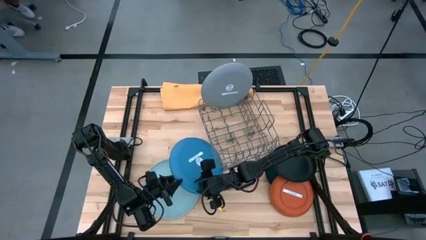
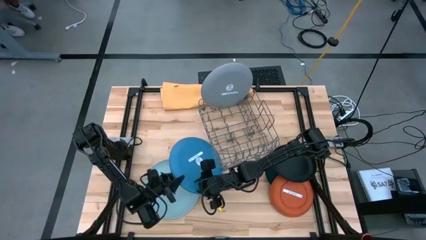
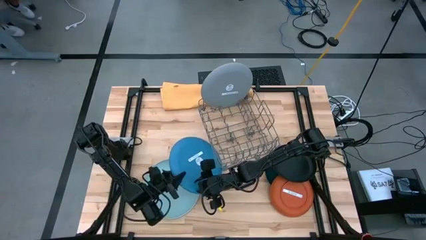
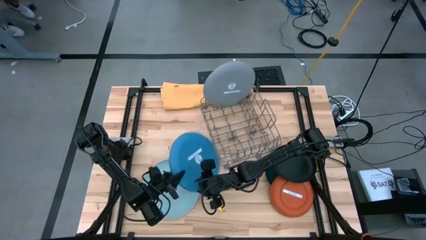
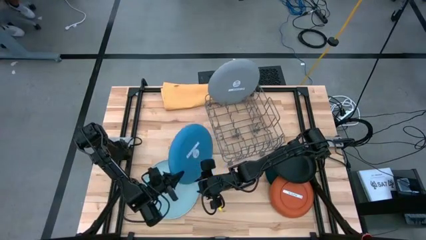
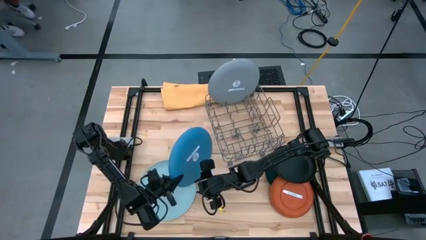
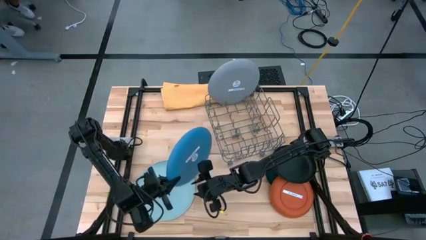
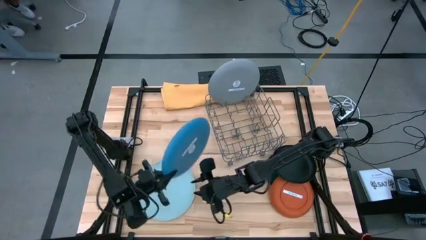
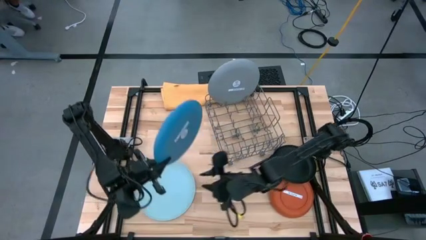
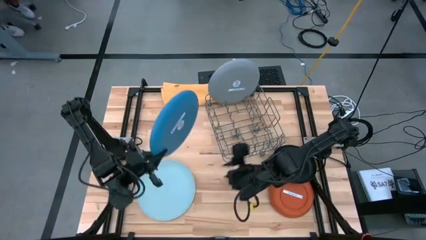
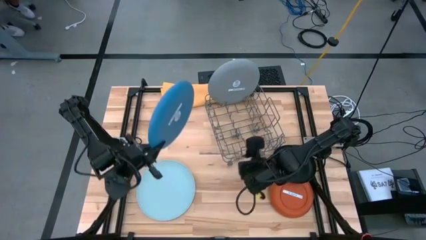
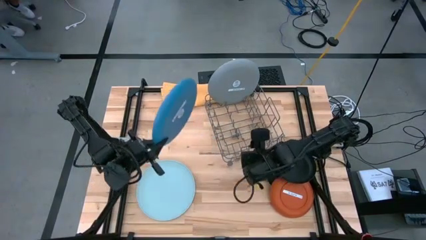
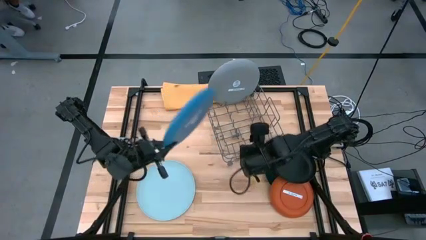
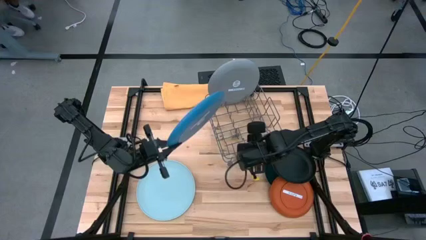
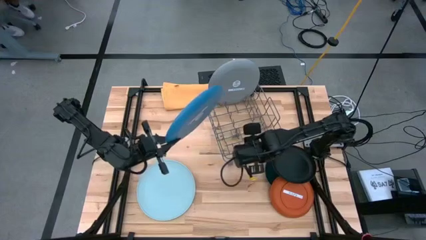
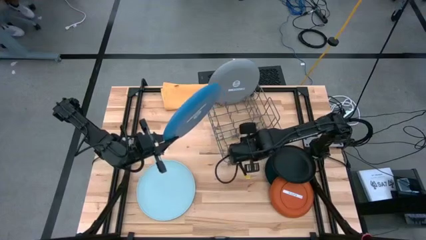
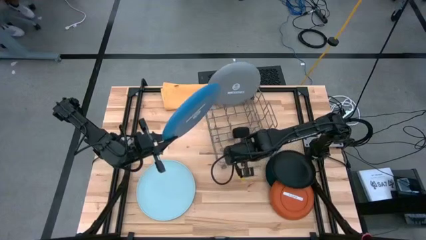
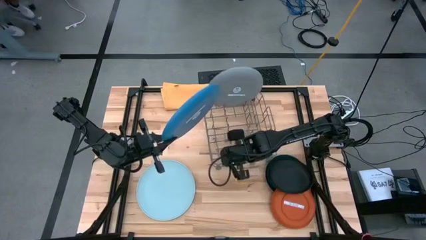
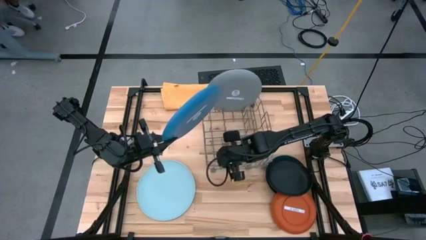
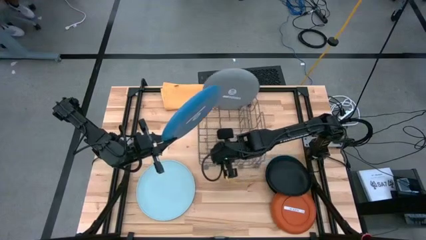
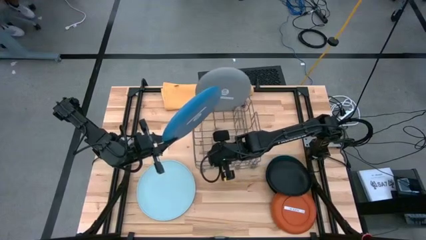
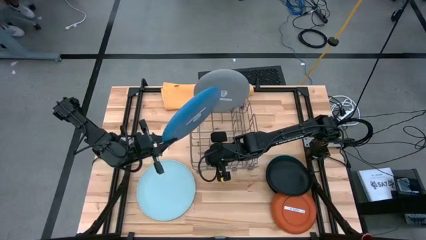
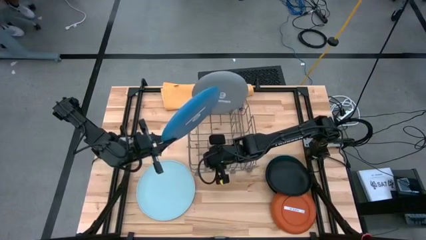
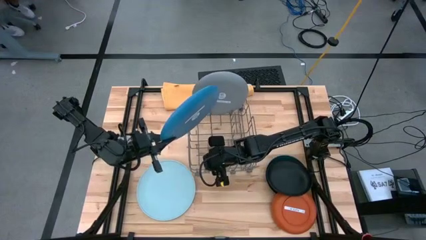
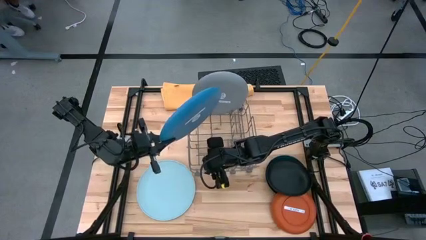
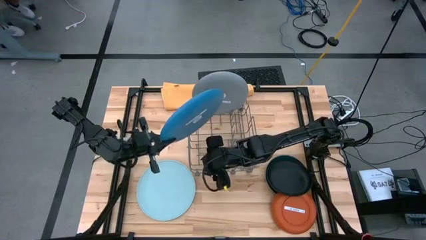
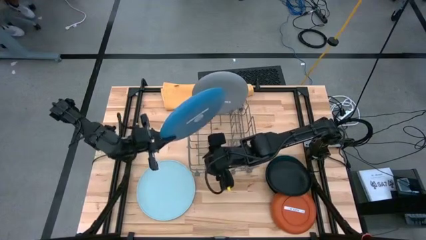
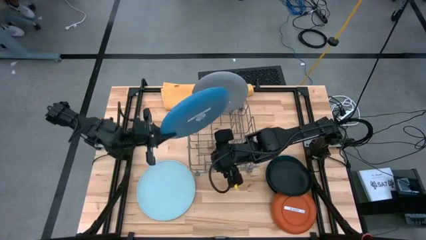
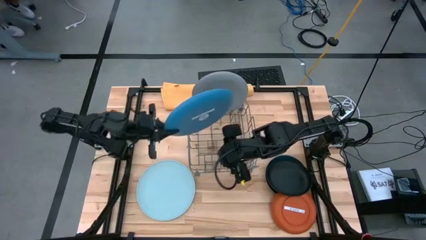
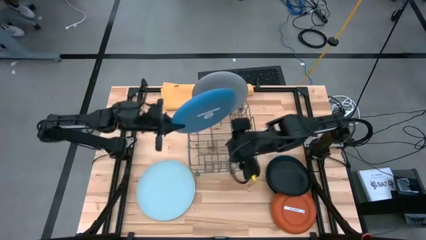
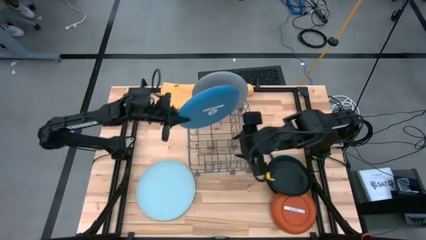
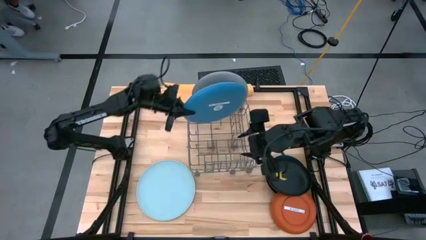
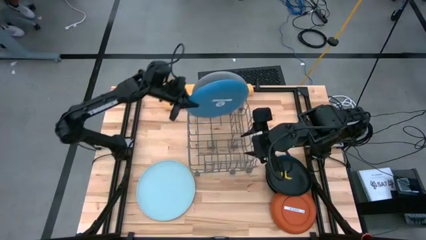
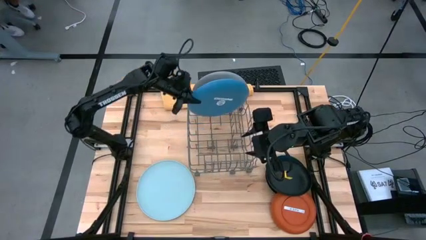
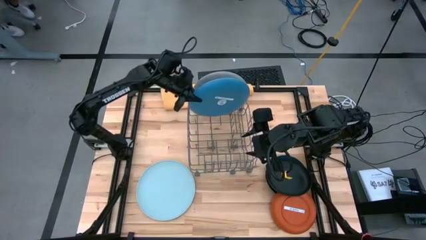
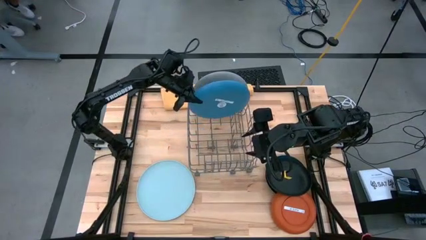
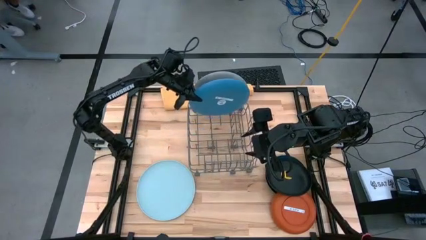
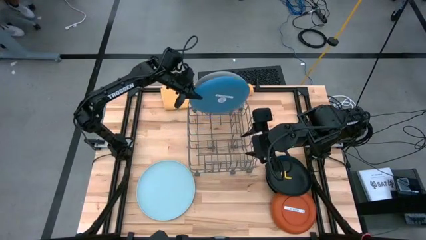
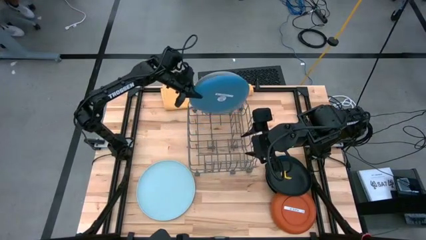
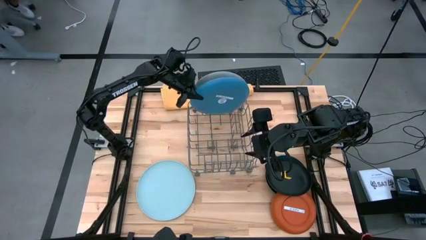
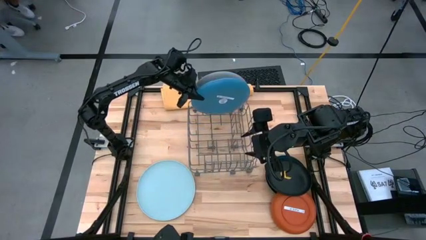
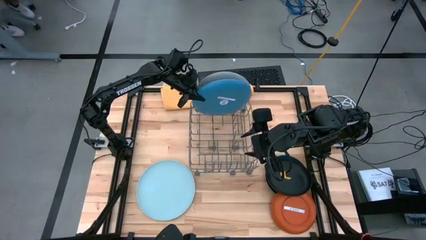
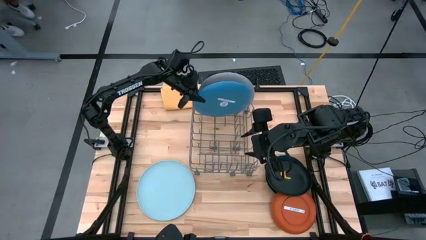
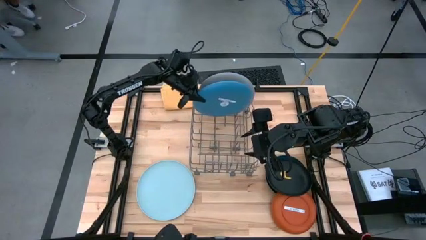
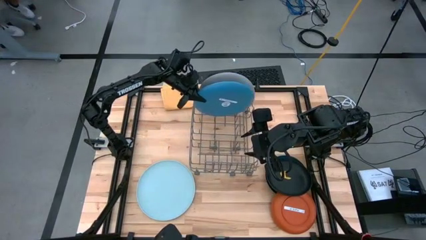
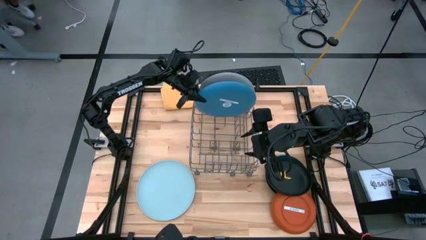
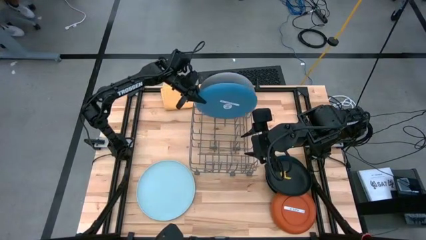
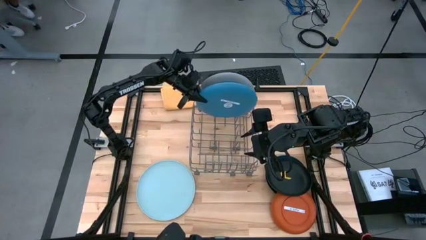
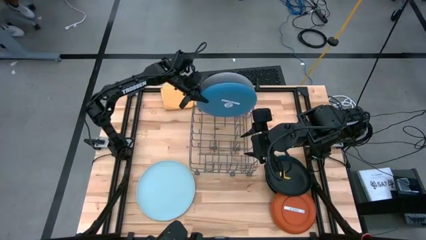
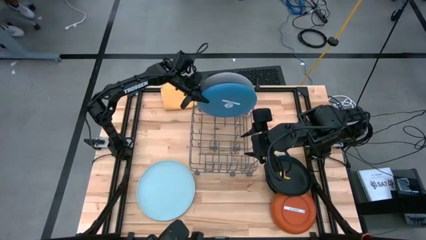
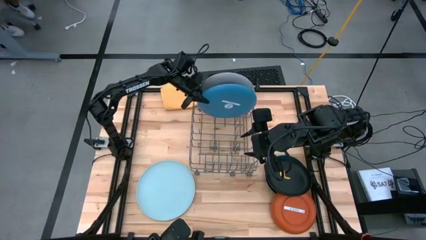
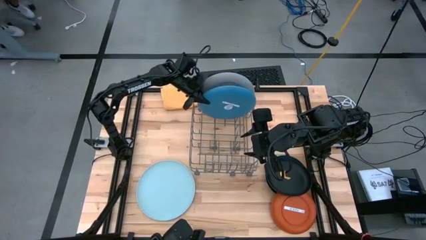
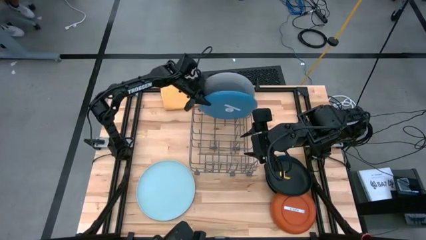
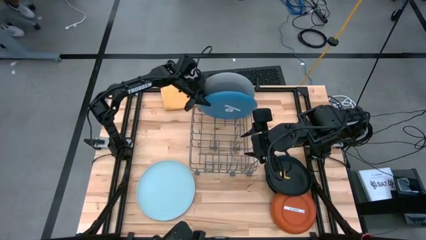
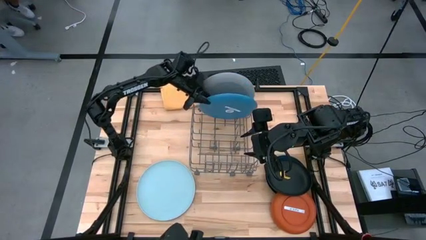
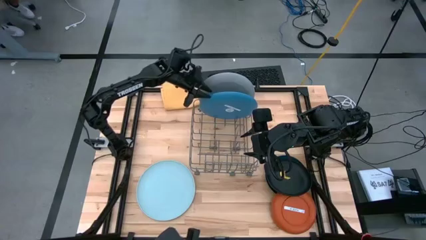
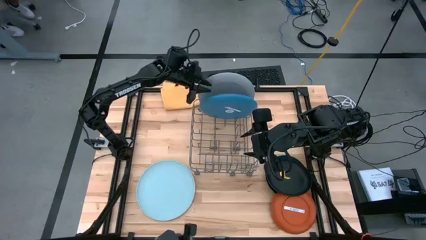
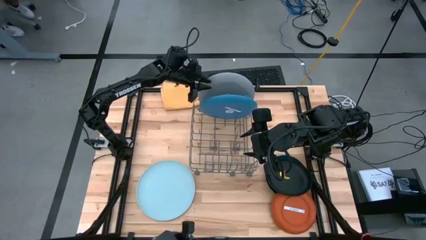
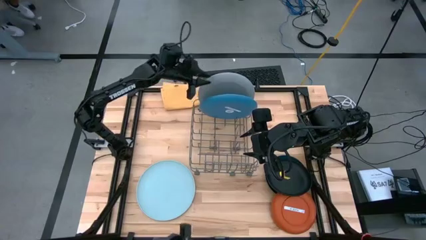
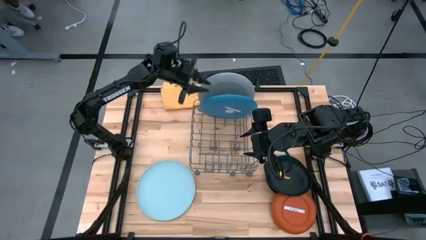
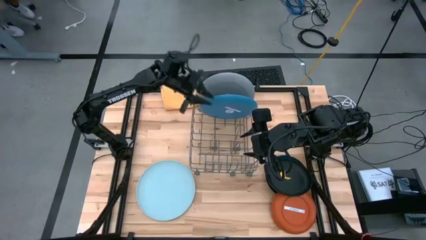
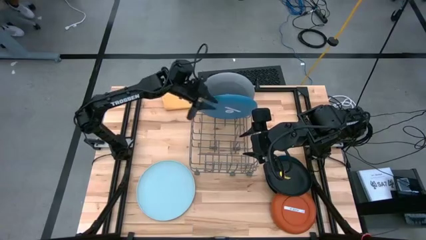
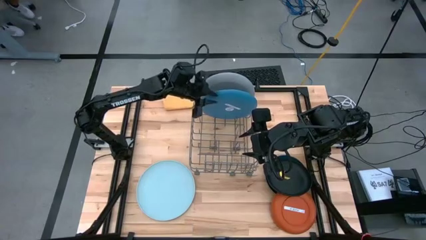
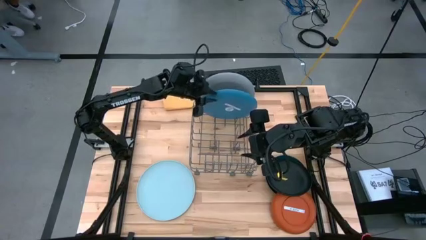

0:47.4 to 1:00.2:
Task: Sort dishes
Put the blue plate into the dish rack

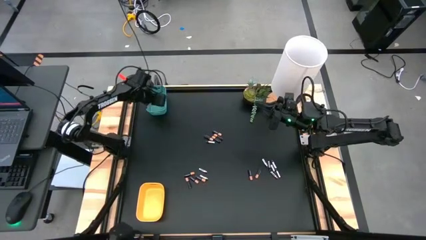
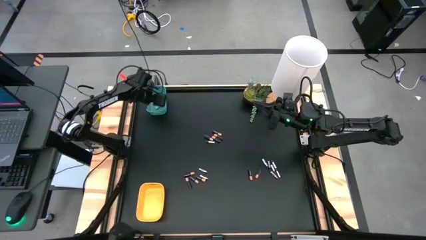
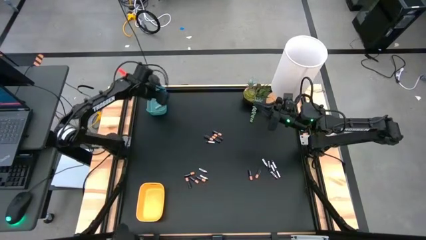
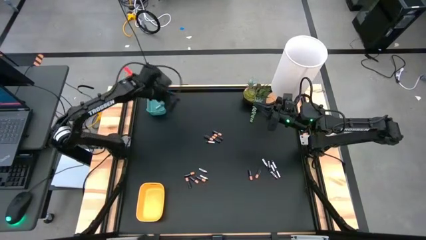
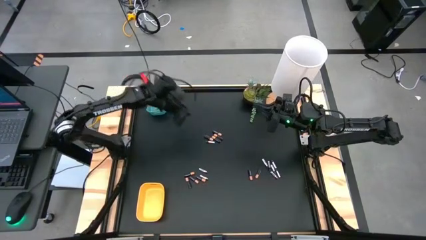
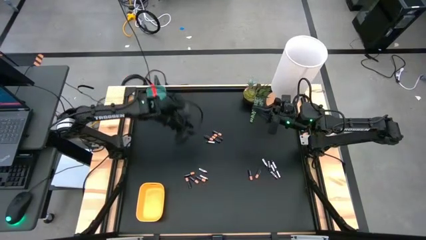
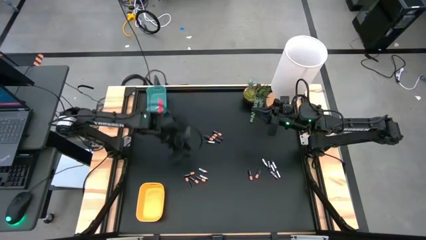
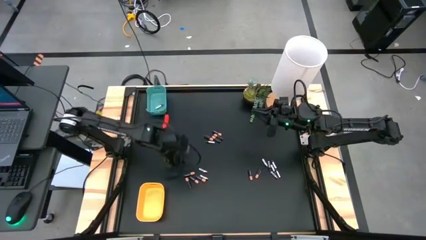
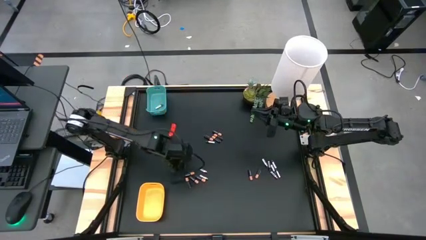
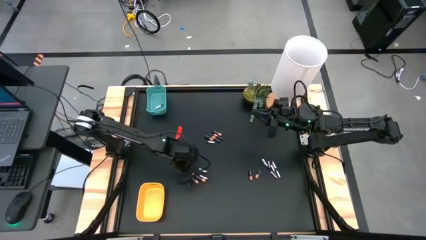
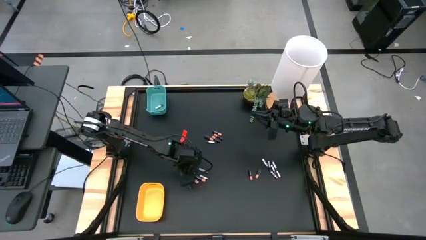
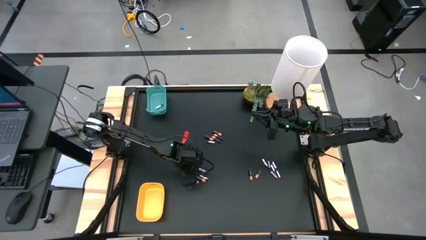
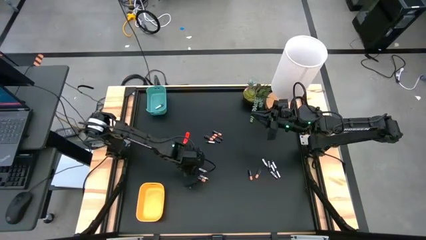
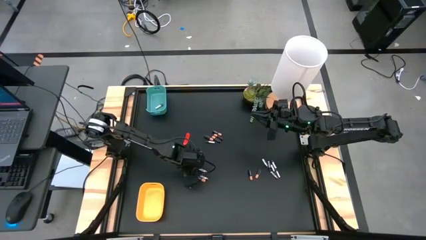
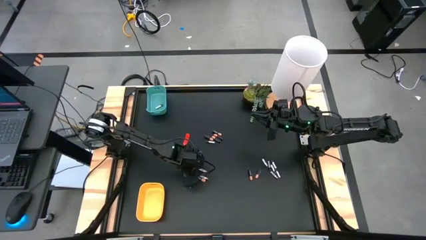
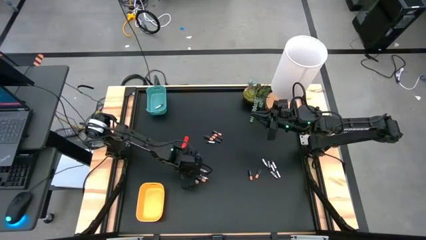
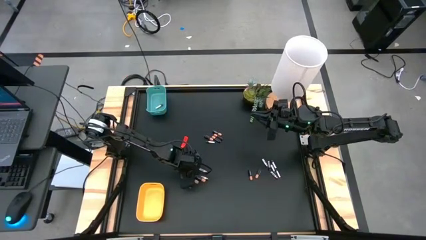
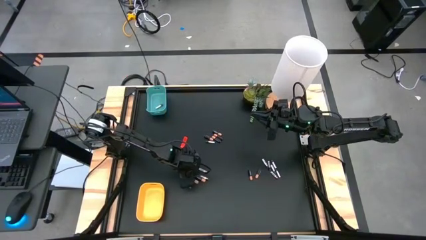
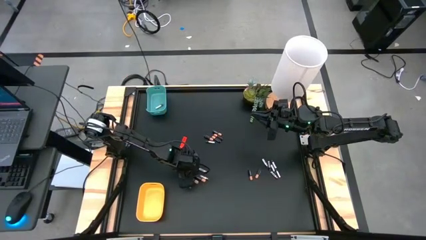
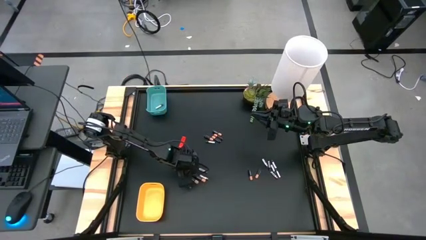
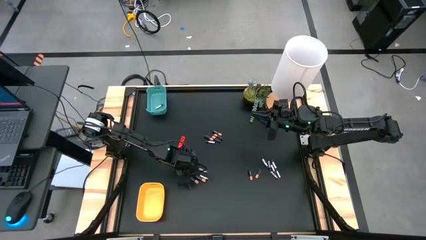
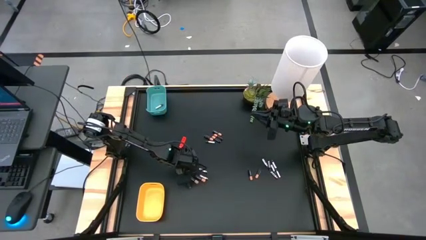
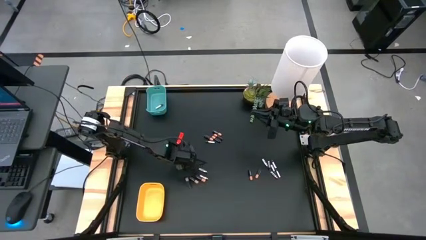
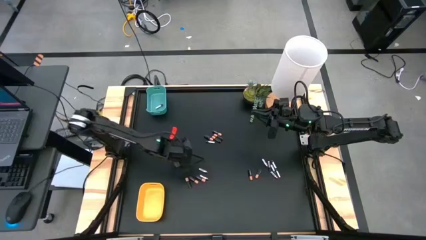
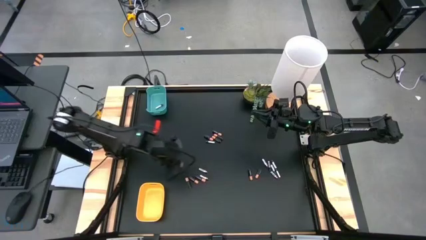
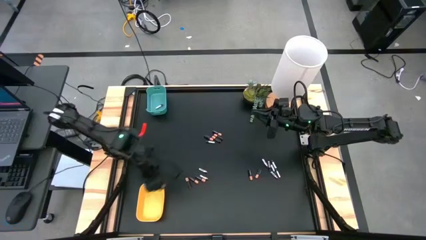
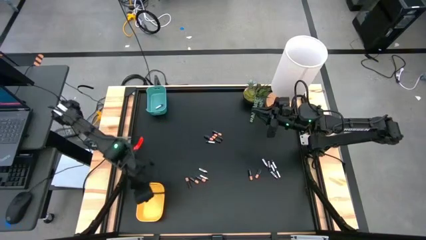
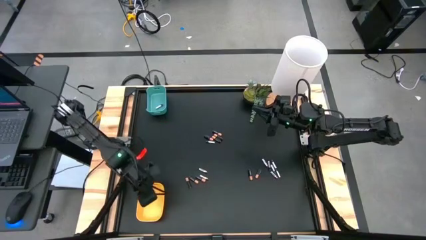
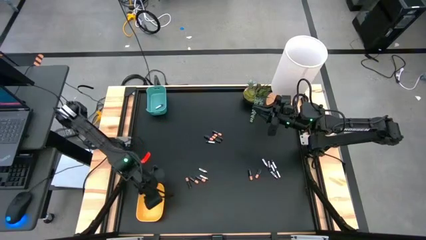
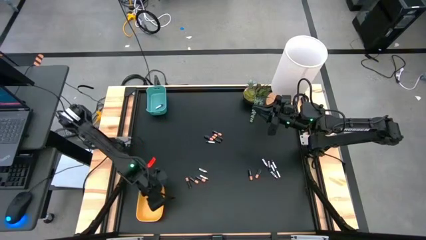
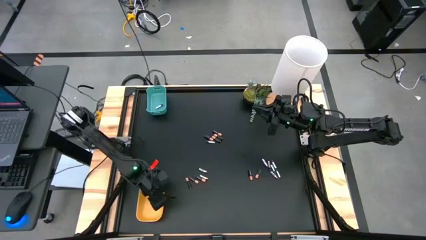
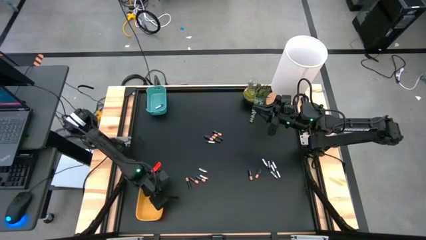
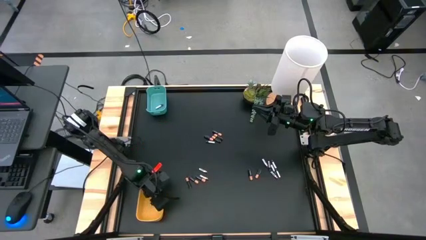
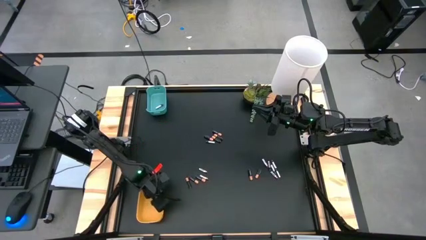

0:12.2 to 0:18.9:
Task: Sort batteries
Put the black battery into the yellow bin
